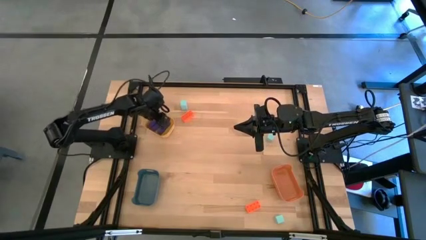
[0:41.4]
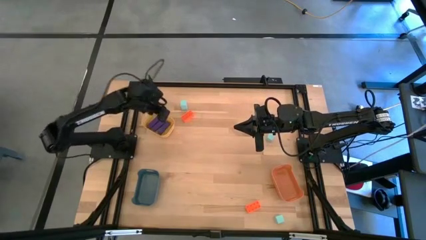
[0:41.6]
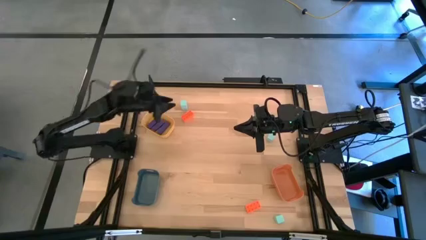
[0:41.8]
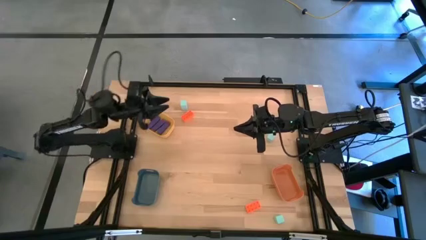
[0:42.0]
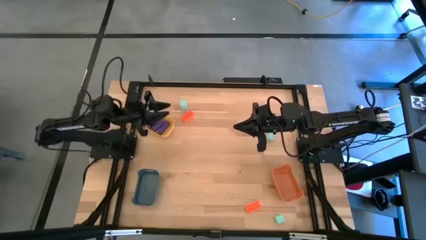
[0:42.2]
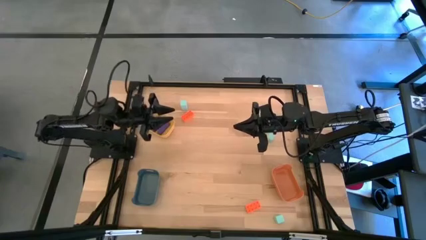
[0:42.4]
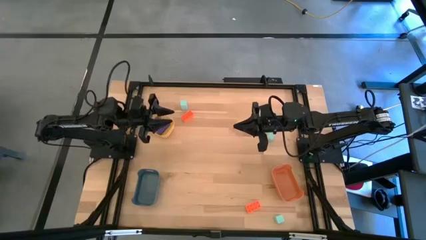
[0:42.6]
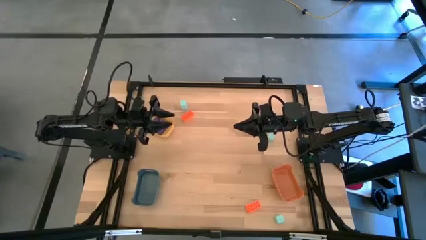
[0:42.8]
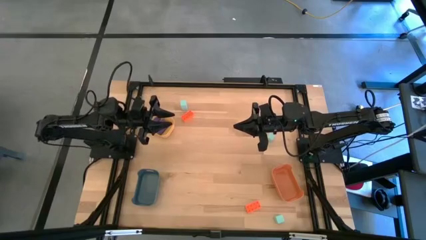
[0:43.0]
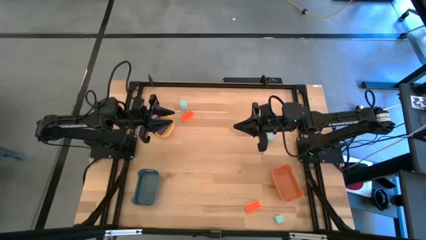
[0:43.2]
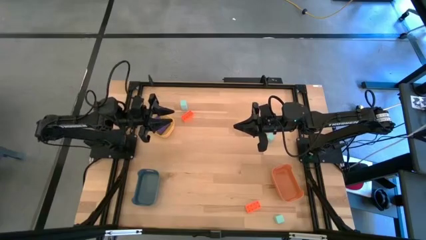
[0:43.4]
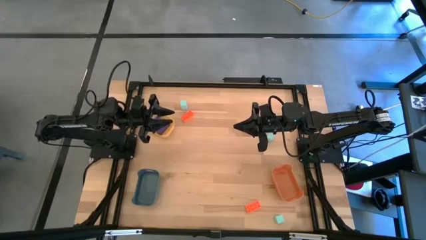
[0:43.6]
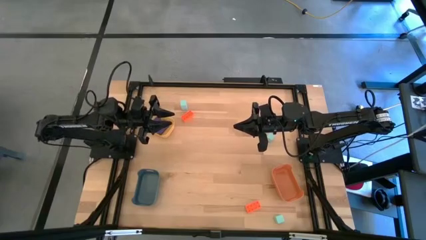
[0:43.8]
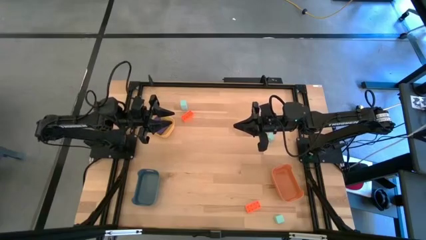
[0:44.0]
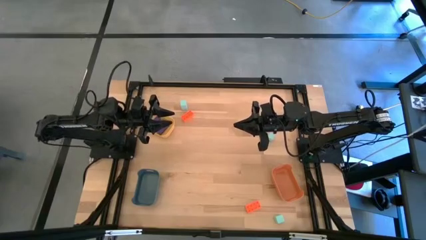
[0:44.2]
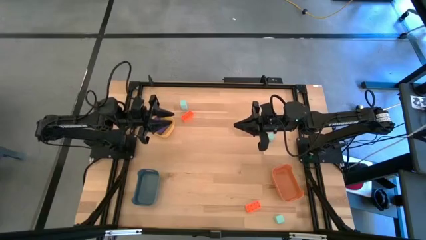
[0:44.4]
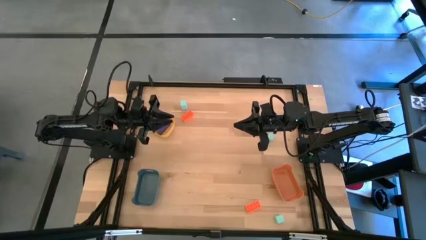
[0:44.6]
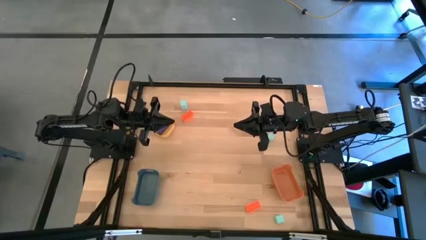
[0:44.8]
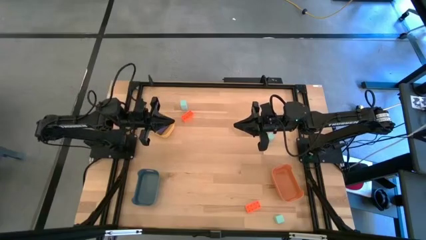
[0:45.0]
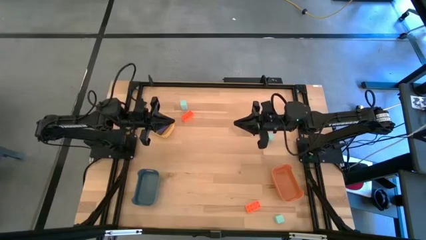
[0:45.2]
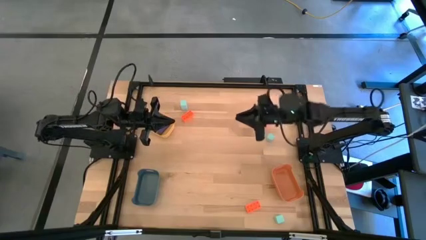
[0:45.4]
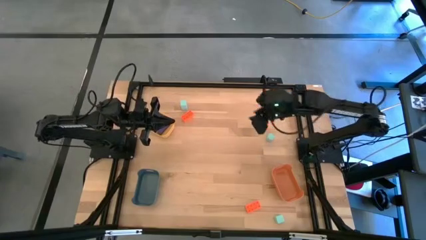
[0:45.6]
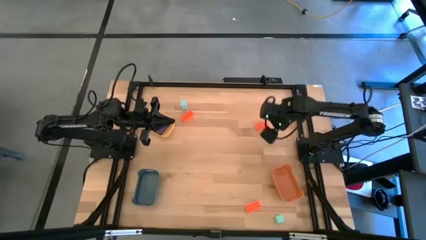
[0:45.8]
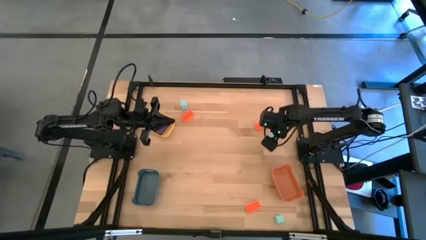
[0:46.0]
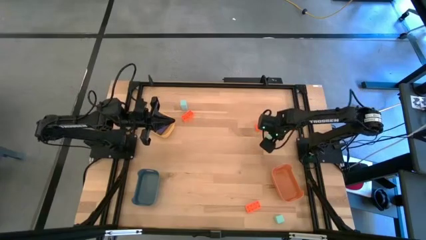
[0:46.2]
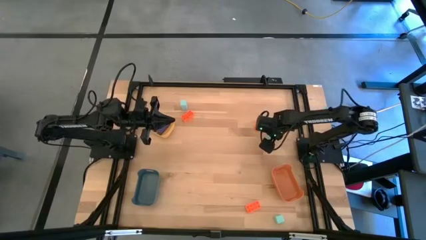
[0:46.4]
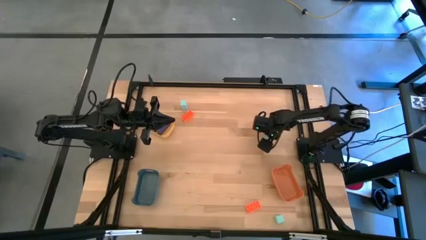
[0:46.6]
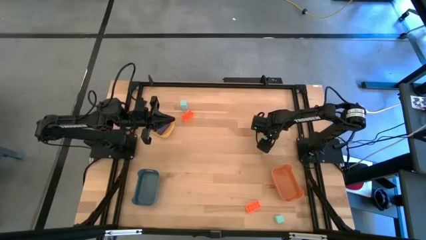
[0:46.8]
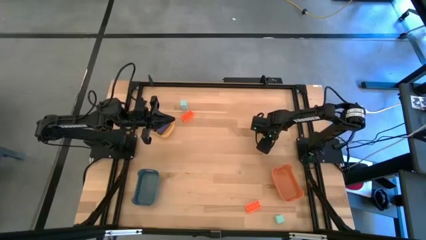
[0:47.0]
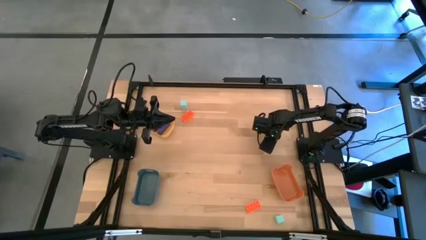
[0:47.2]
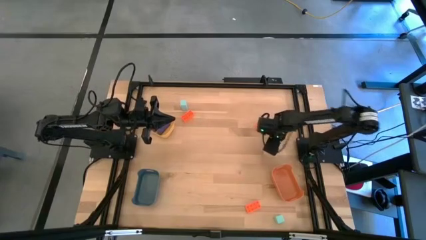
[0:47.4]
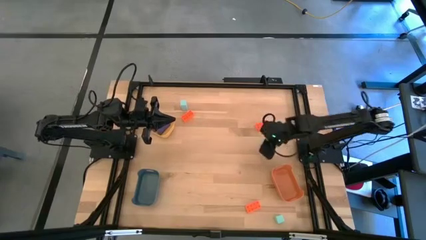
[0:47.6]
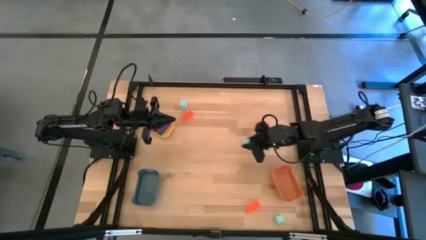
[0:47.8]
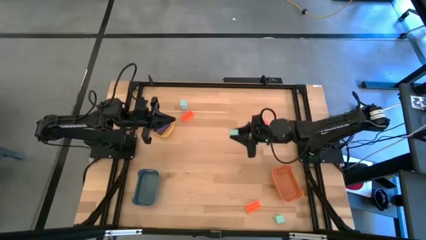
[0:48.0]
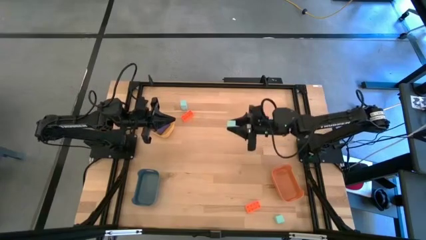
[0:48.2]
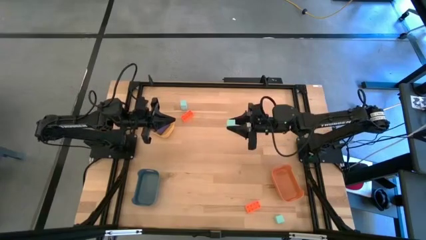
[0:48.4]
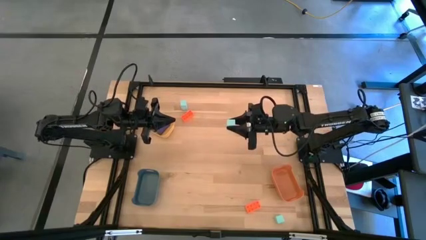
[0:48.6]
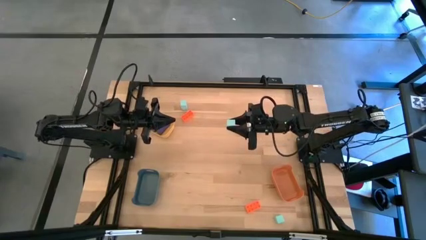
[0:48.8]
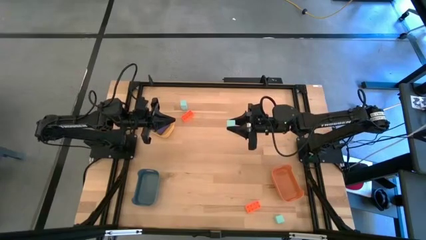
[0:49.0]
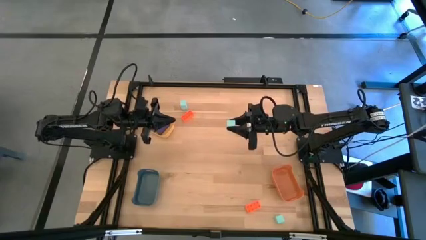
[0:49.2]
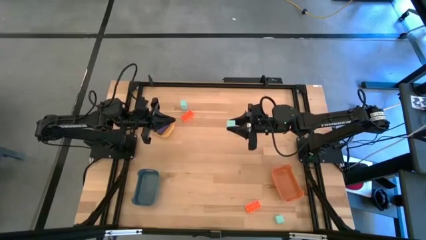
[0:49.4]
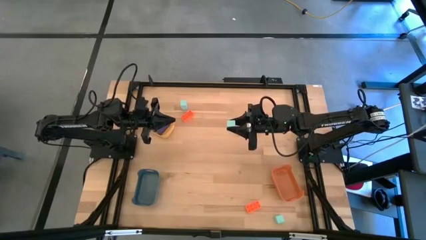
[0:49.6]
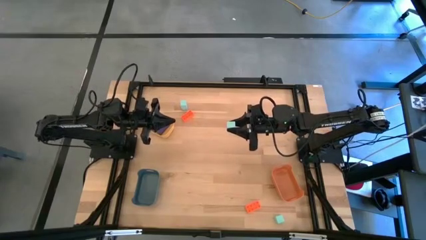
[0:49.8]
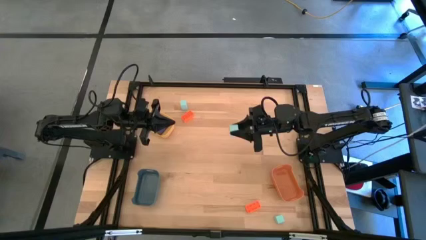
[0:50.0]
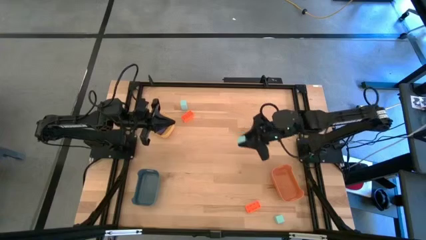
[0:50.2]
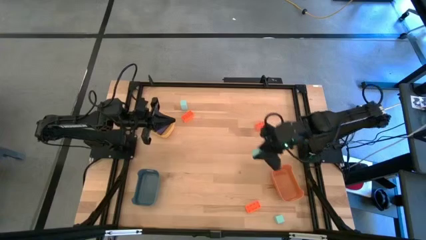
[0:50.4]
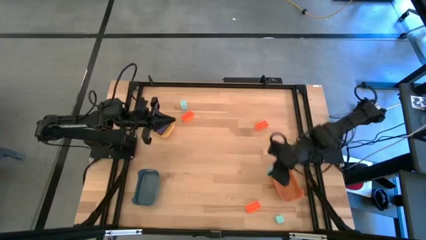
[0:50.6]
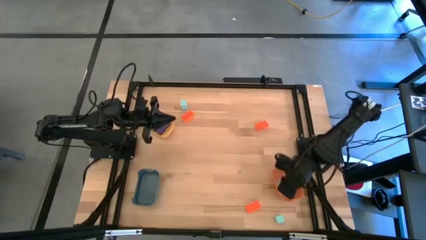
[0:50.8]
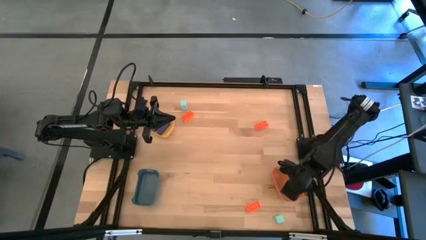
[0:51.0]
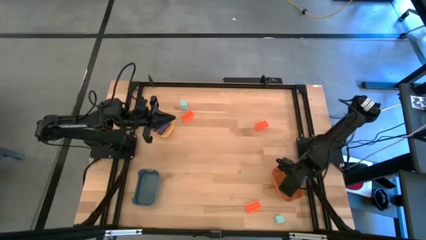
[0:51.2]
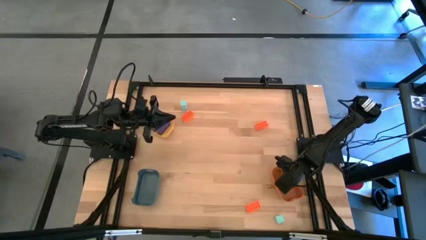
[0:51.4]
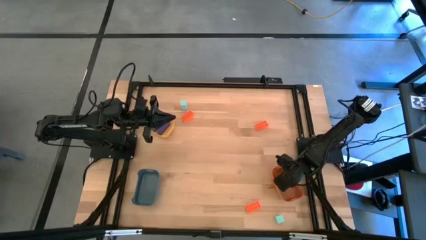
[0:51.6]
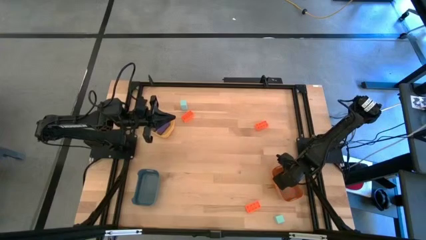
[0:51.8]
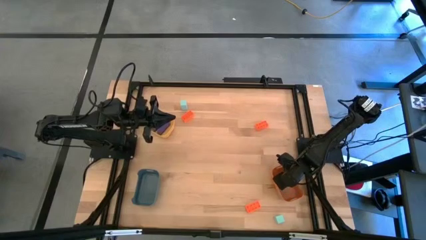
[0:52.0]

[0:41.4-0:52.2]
Task: Sort & place blocks by color
Put the top right light blue wooden block into the orange bin
